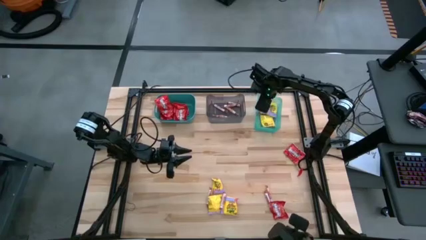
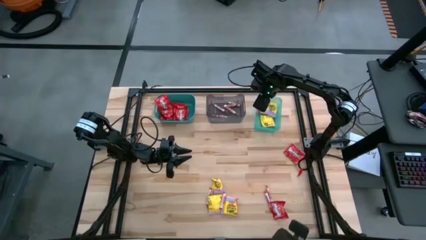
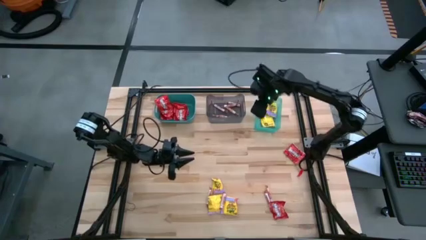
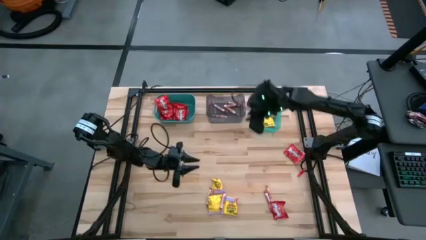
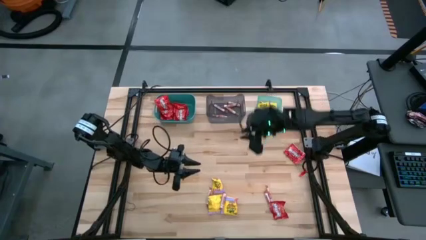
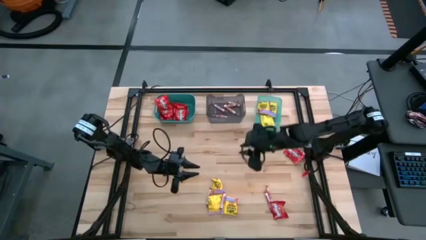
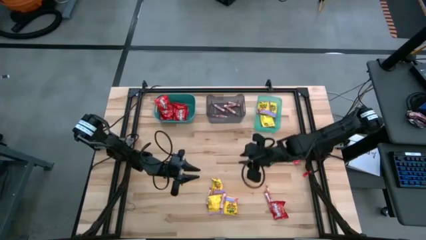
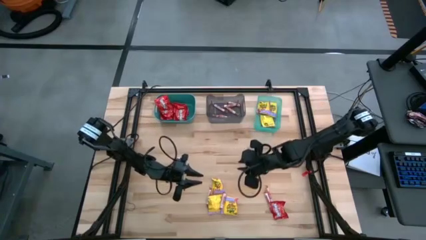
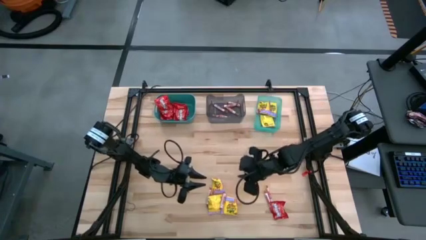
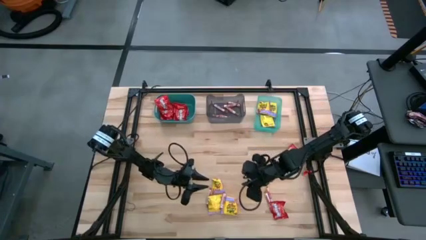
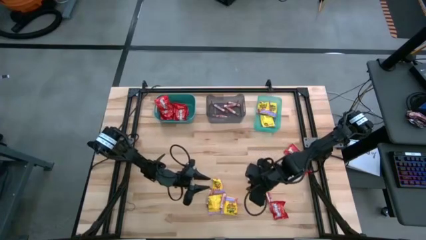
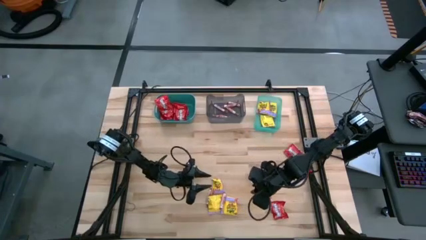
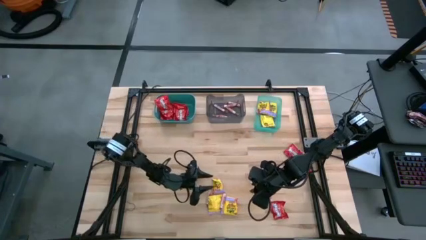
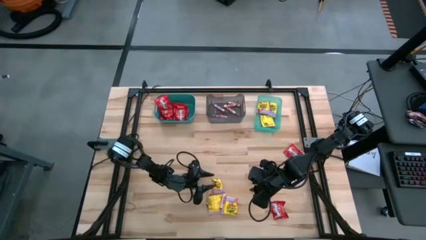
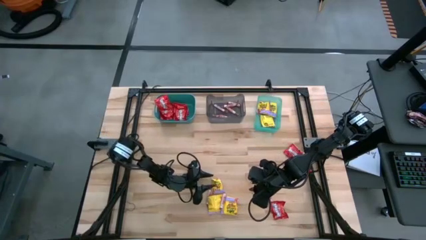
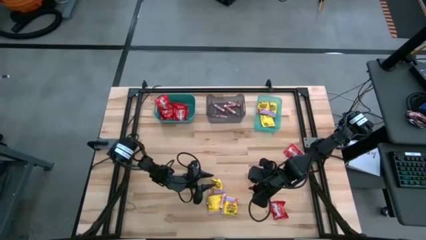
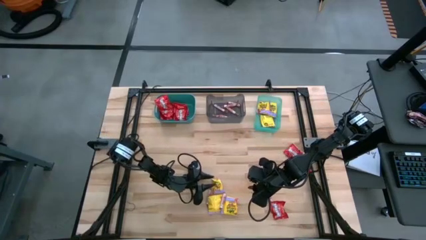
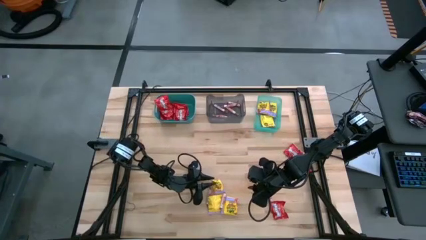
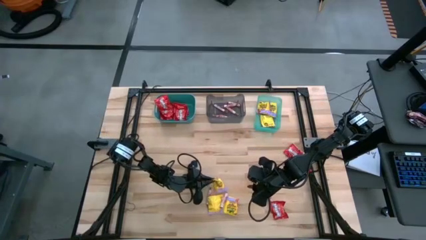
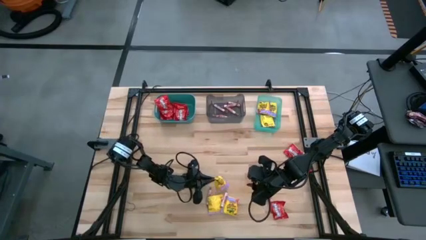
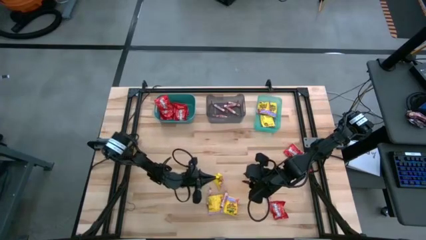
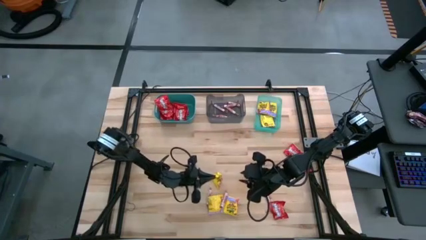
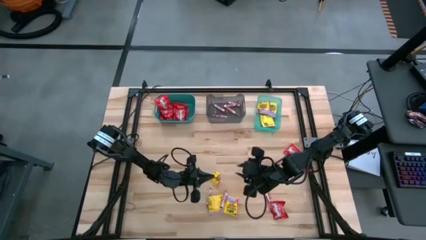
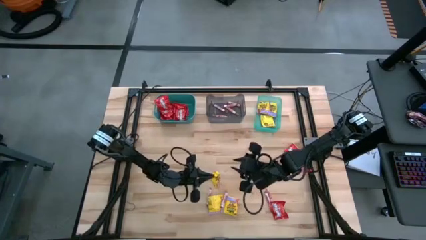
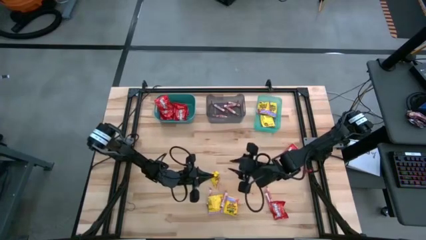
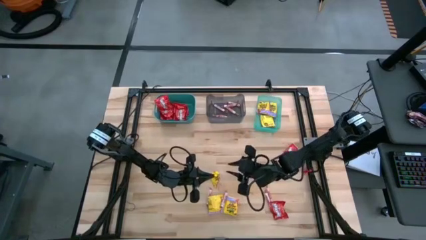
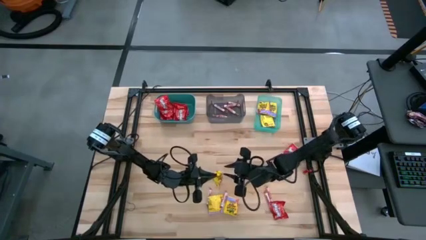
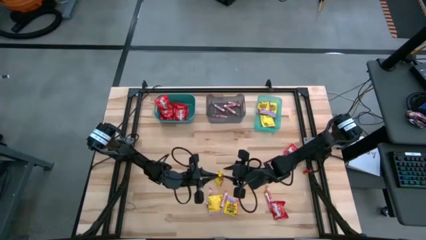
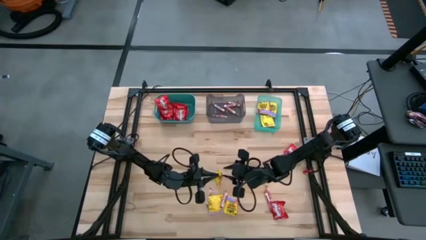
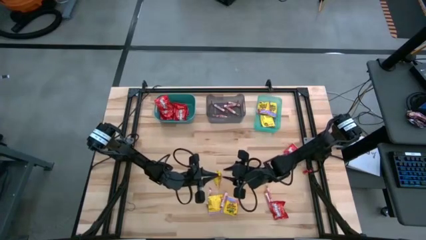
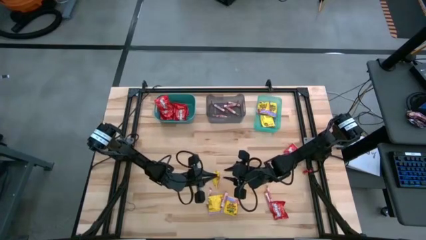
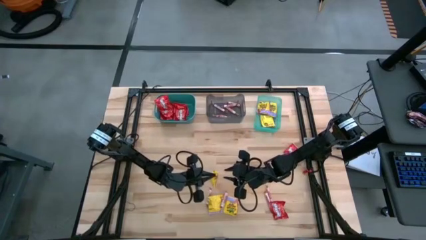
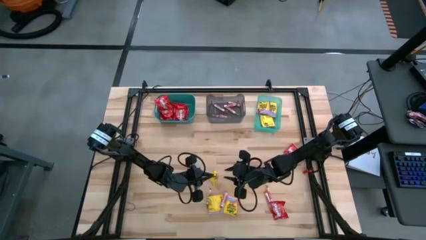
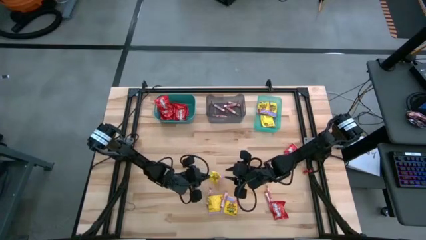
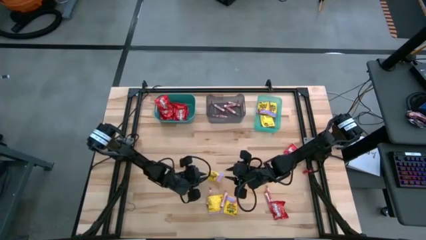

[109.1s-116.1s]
Task: Sort candy
Put the yellow candy into the light green bin

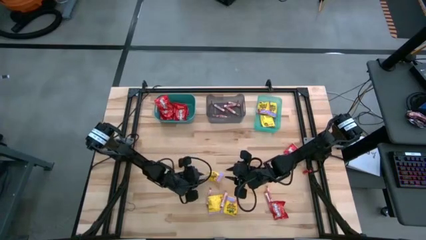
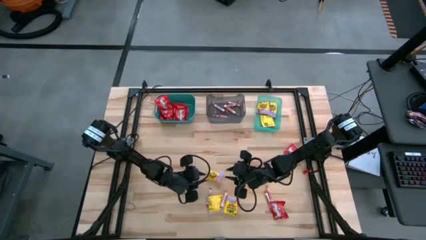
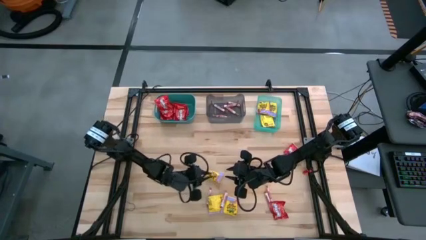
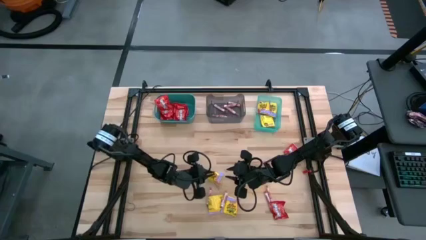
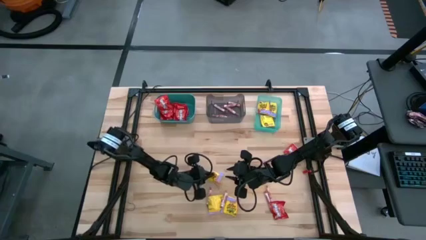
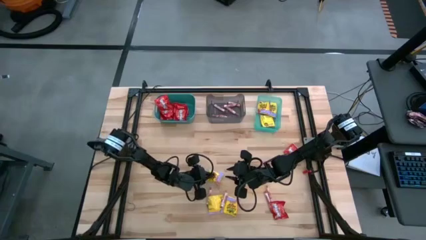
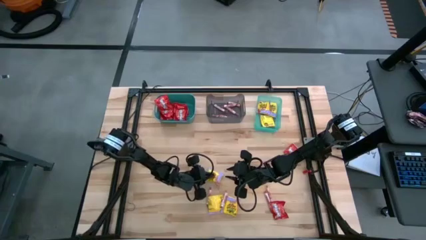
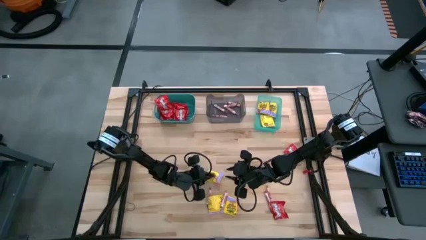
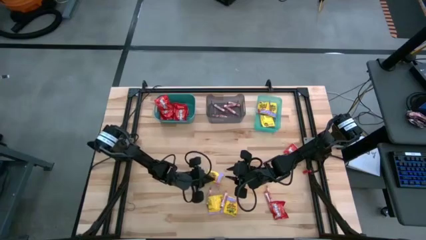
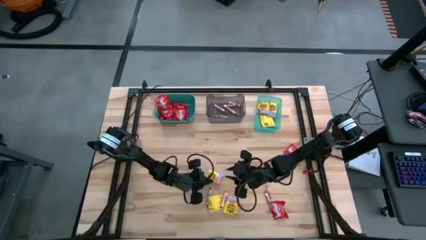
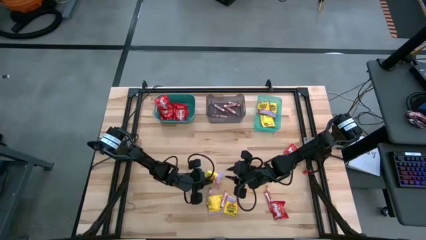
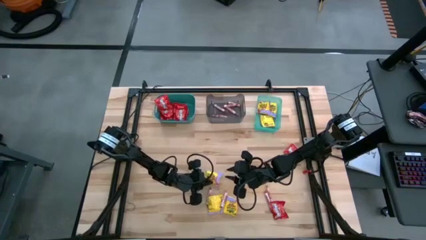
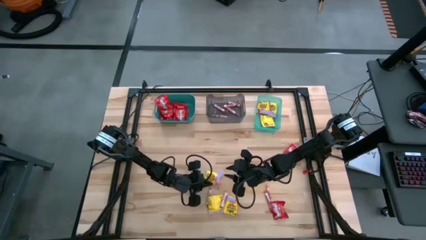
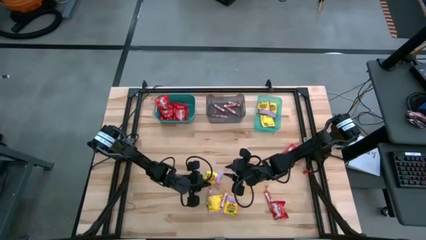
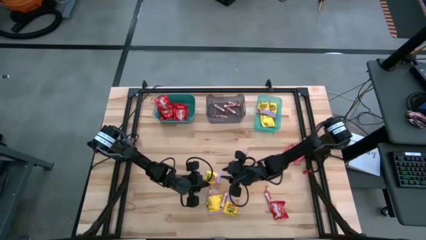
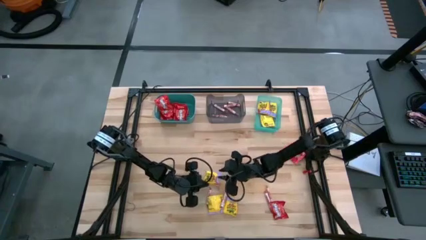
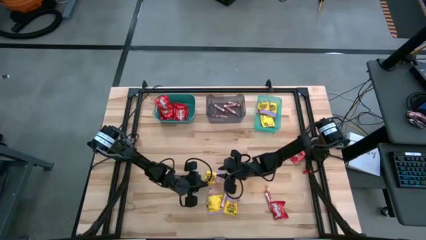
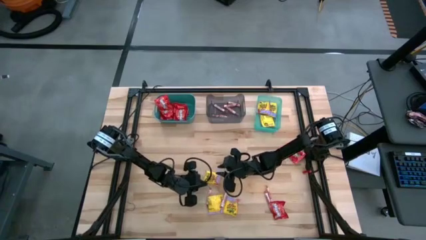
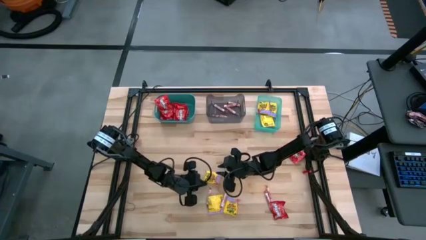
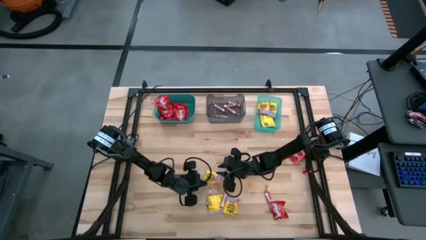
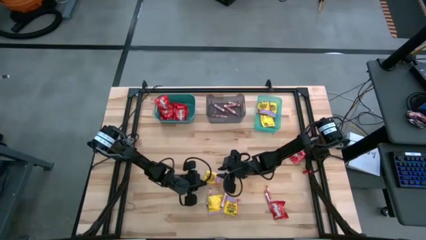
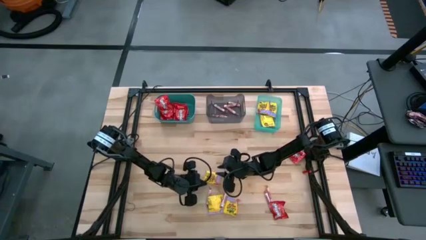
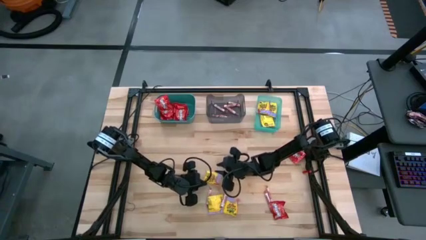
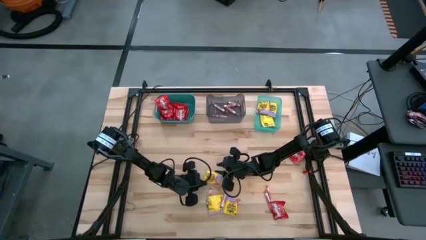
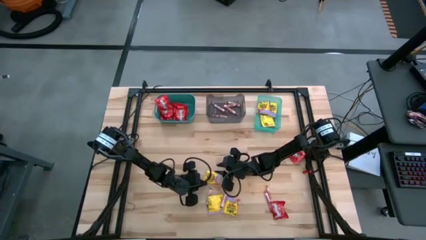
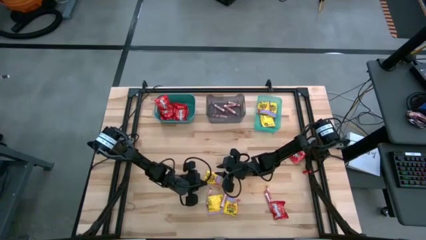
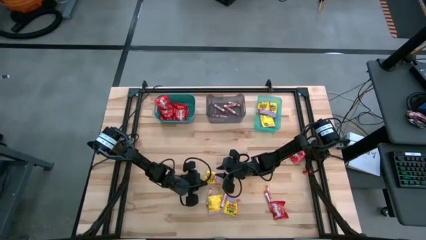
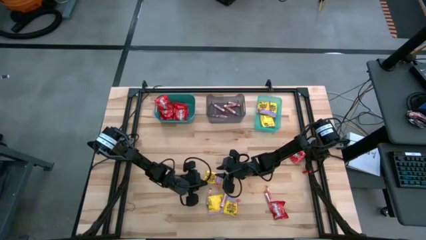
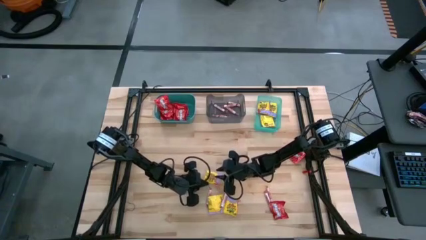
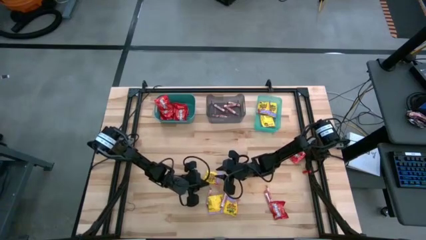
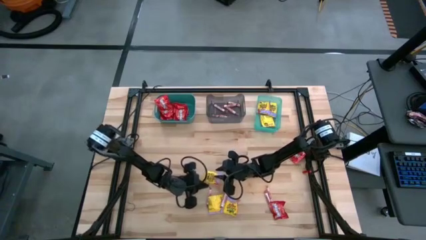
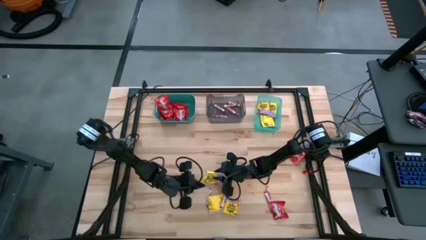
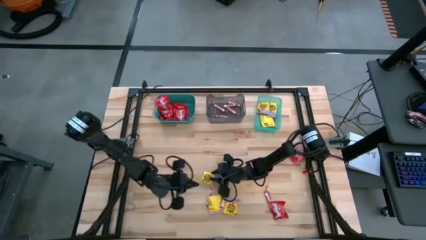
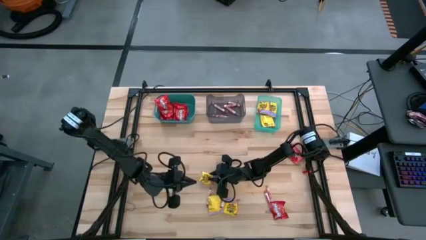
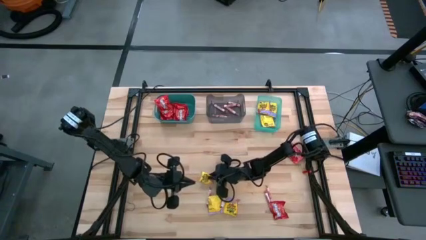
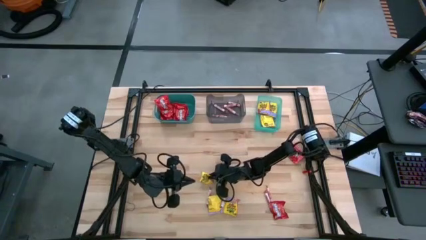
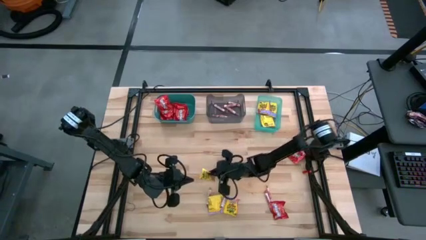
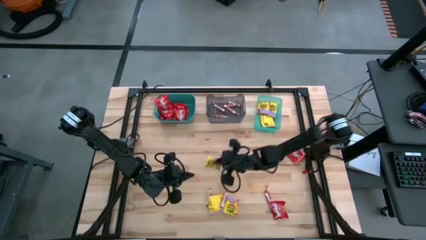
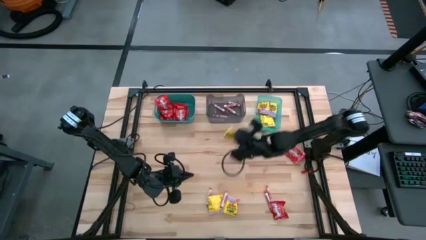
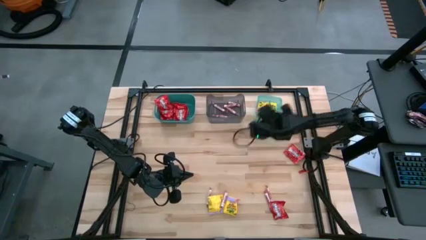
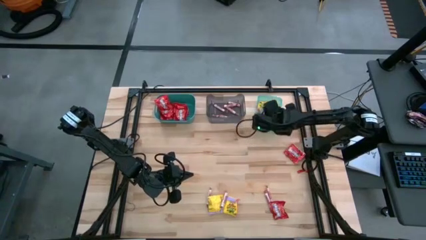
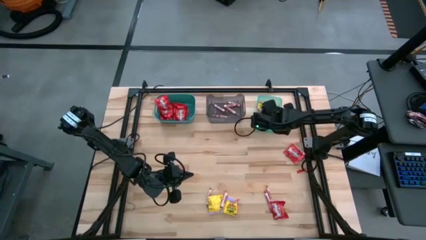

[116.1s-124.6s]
Put the yellow candy into the light green bin

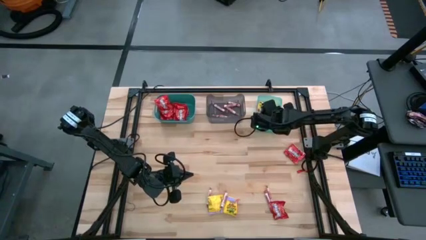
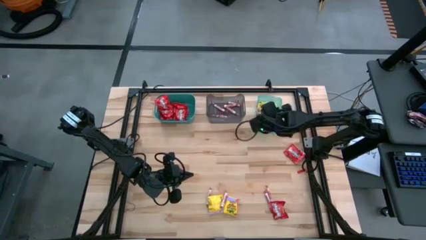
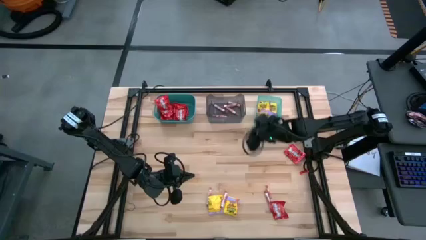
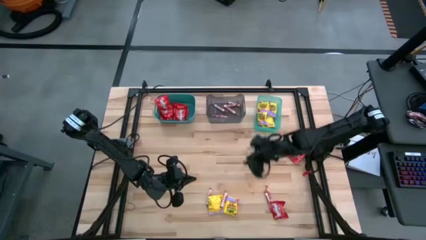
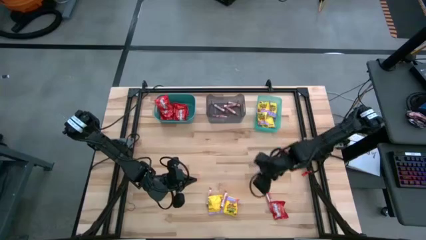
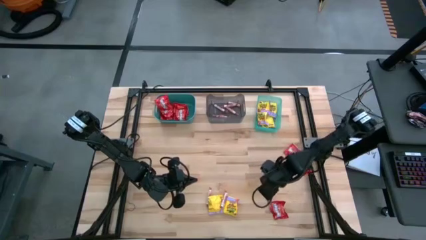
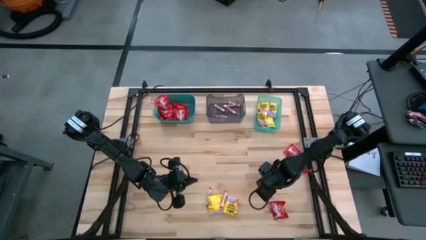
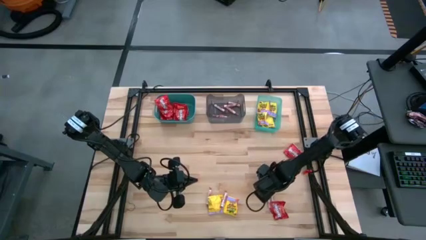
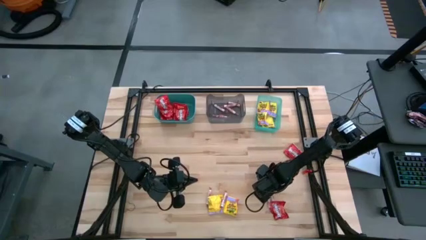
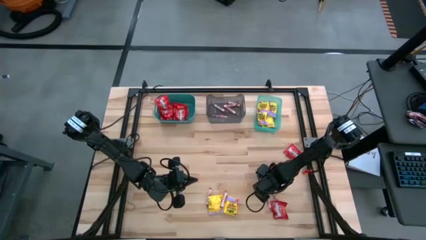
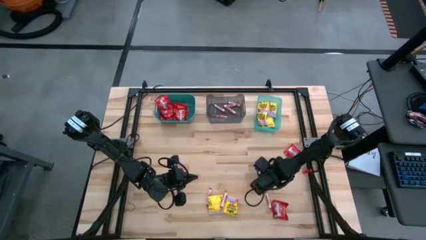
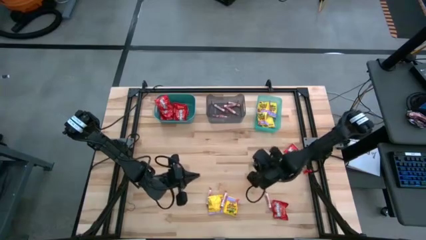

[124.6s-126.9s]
Put the white candy into the black bin
